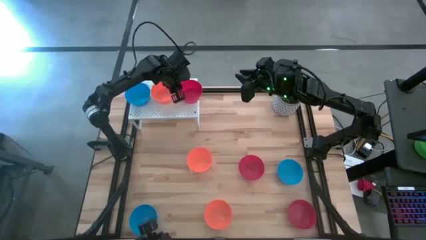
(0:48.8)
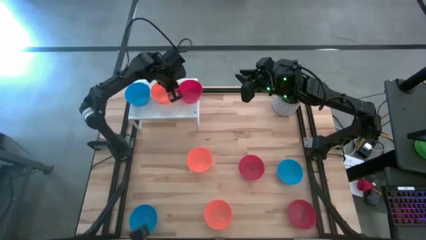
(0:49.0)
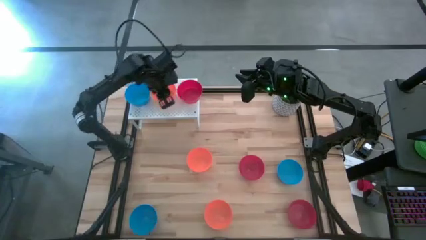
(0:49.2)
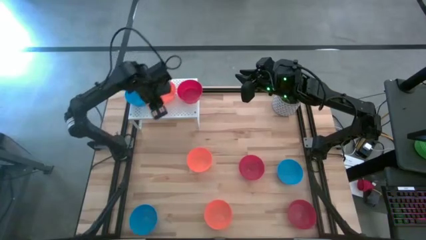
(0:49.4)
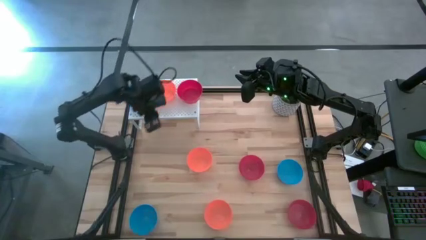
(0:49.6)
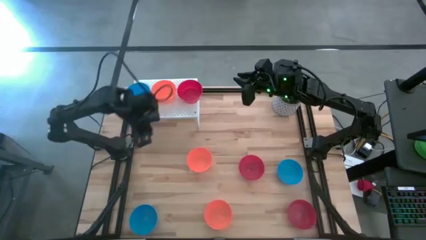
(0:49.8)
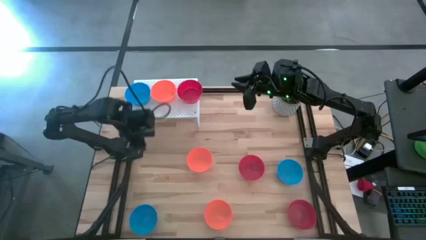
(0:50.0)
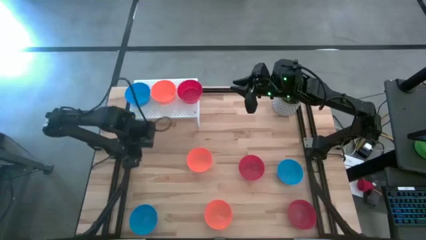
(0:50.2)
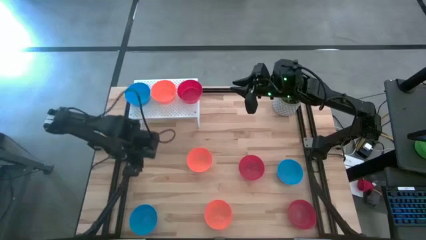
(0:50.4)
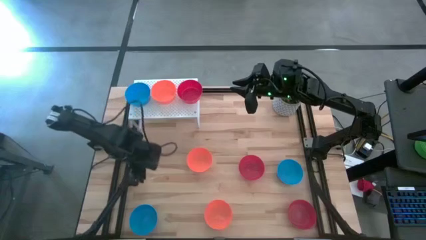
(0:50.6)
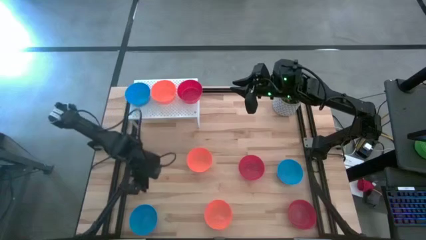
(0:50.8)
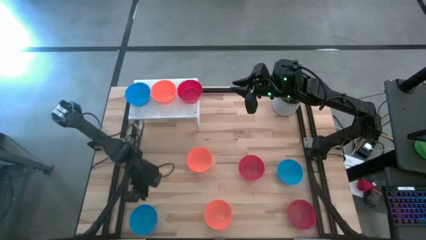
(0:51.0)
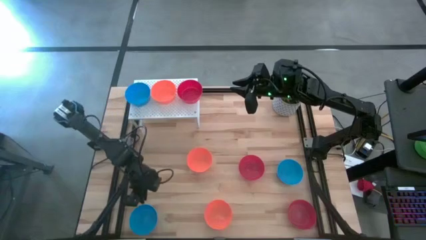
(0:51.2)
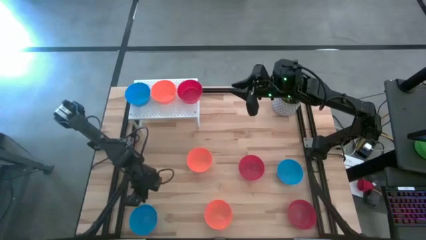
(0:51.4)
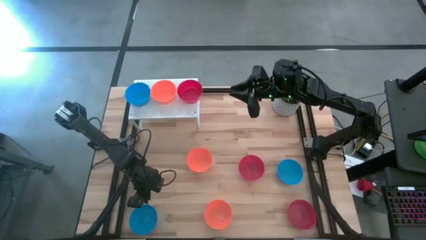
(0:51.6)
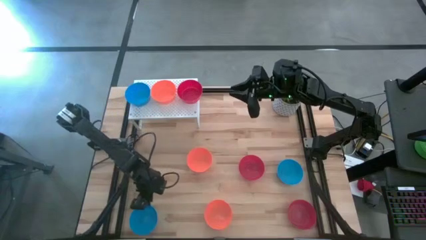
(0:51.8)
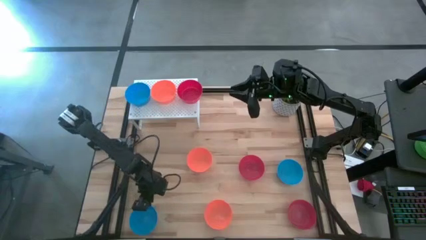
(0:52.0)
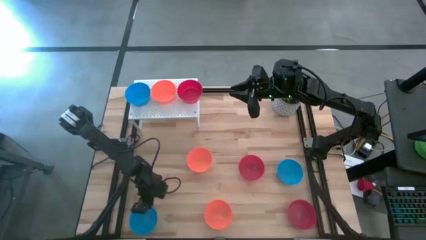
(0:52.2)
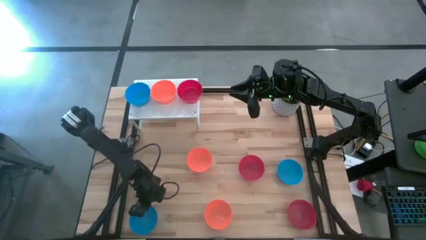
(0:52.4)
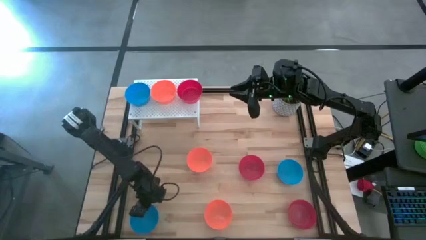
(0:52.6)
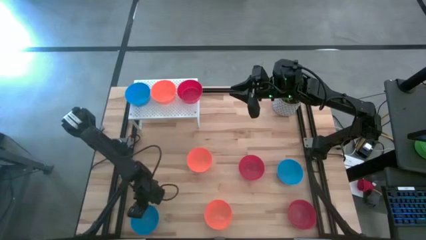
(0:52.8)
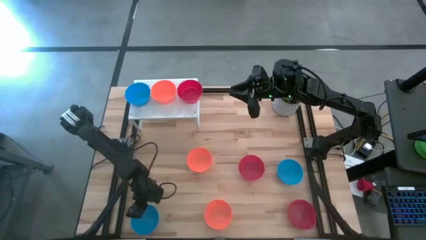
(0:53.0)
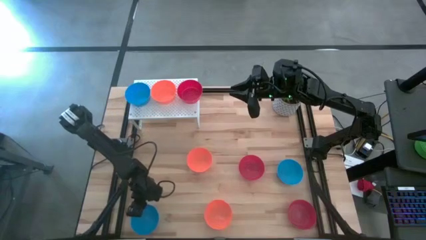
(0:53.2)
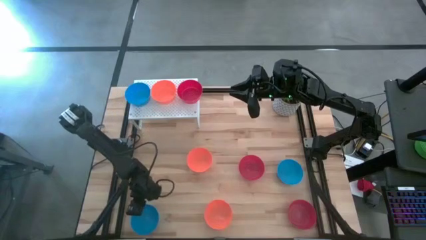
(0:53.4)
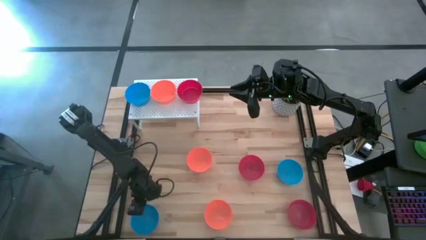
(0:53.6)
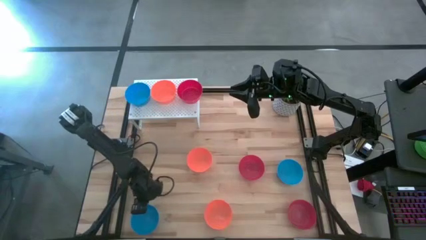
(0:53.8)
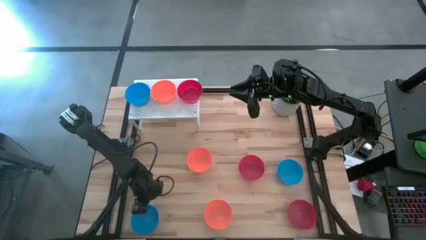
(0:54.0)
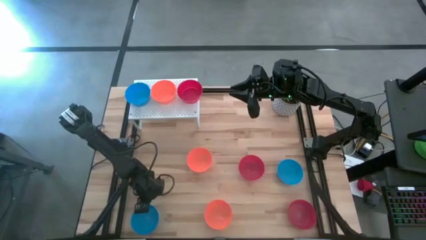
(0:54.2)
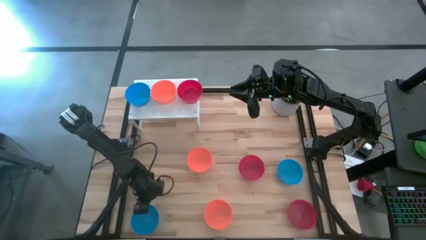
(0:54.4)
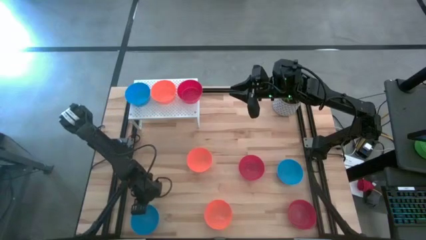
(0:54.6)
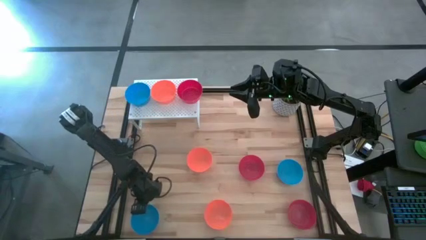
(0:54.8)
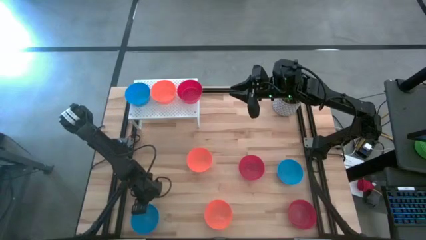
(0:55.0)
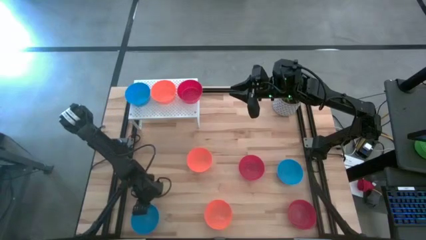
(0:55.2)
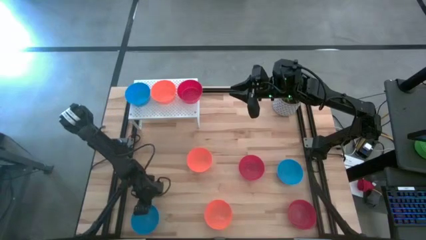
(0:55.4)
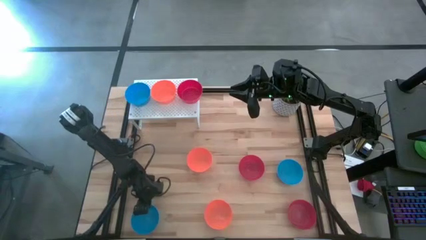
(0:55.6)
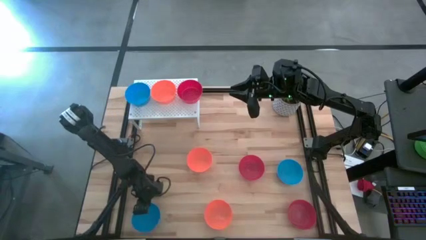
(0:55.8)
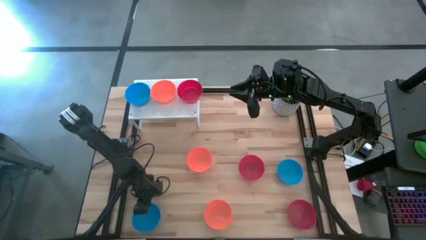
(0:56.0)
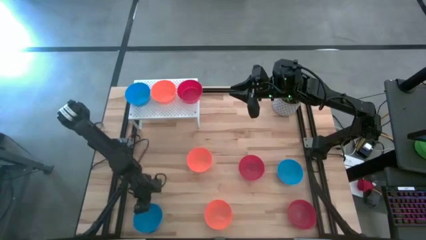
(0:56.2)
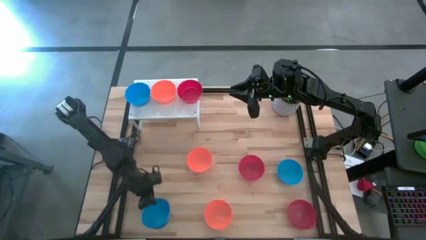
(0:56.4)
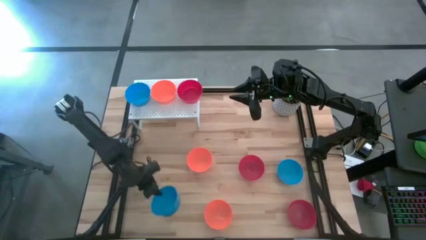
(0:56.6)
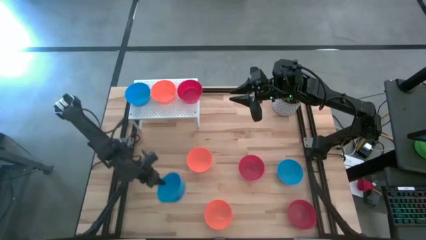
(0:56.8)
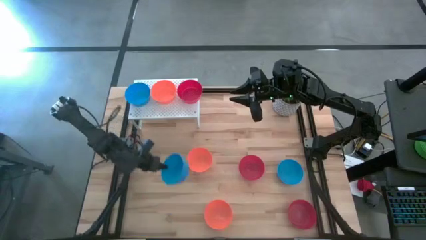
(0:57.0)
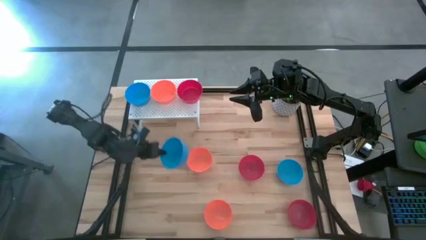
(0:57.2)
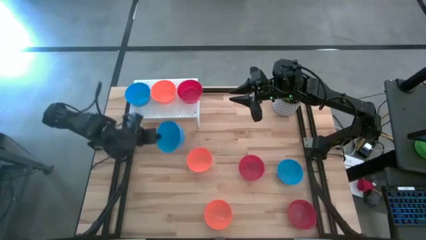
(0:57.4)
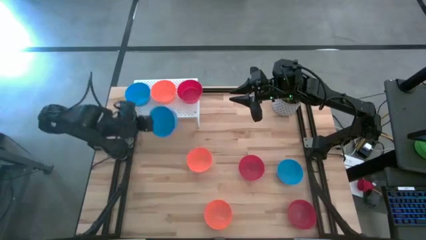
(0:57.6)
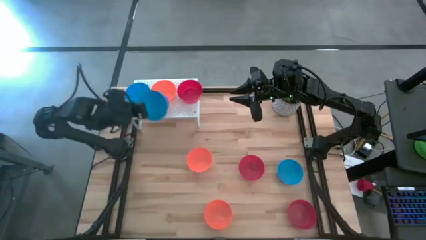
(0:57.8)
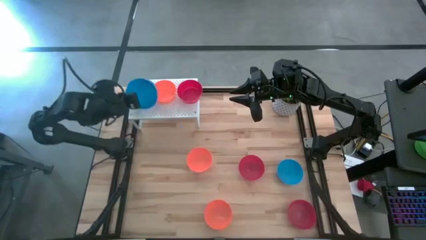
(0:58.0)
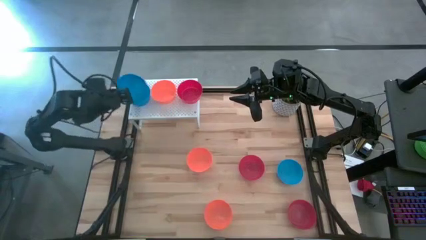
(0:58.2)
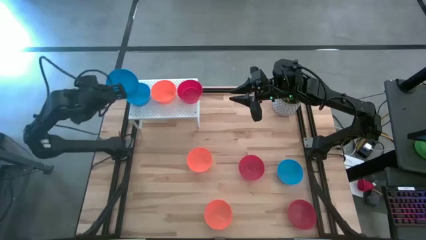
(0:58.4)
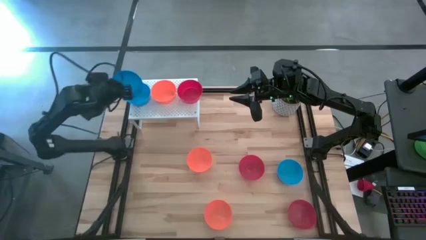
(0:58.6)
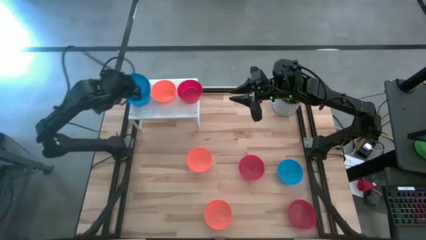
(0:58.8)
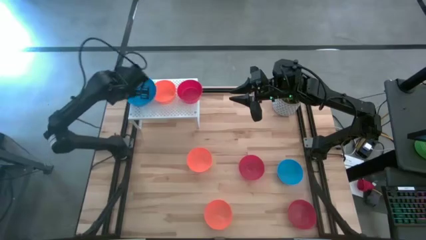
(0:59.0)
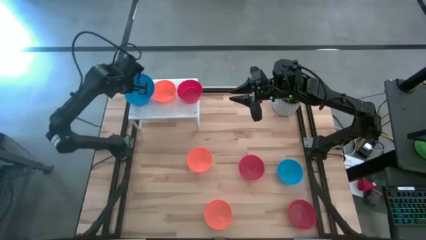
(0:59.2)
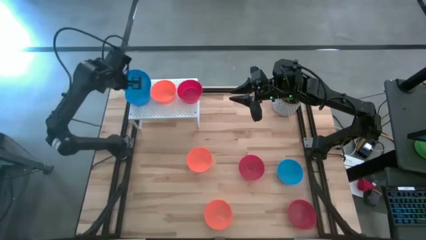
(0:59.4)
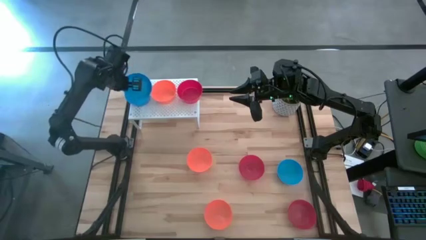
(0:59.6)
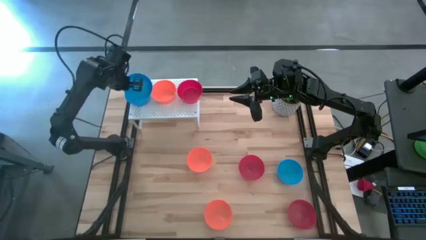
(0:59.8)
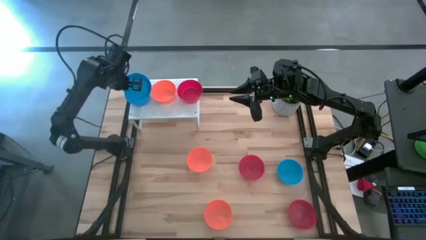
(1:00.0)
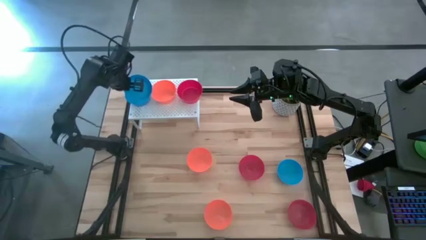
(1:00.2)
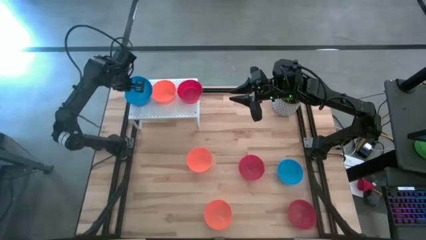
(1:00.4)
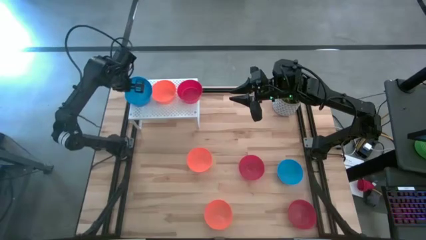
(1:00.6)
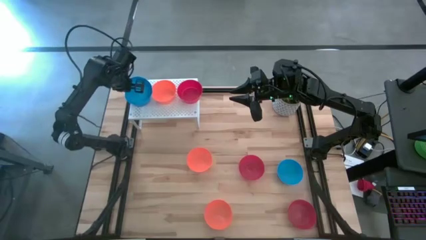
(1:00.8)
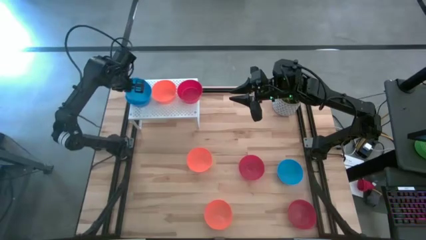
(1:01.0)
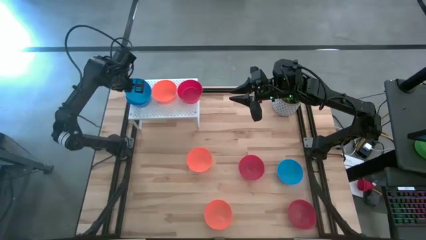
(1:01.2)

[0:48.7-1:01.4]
Task: Pick & Place Mini bowls
Stack the left blue bowl on top of the blue bowl on the shelf
